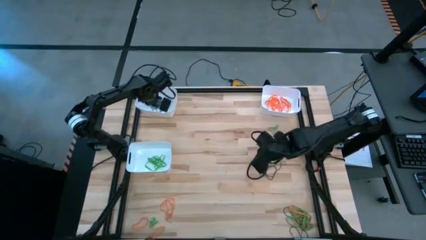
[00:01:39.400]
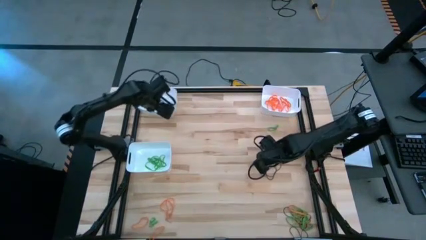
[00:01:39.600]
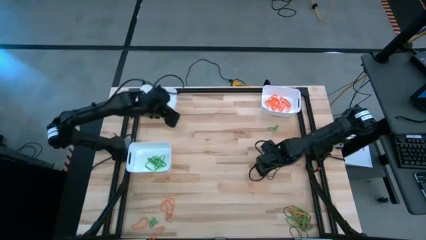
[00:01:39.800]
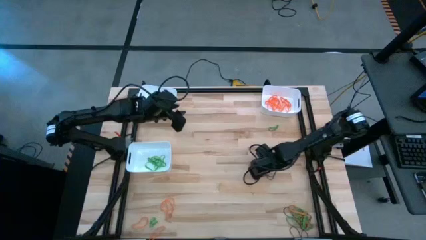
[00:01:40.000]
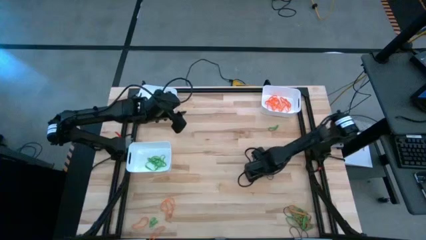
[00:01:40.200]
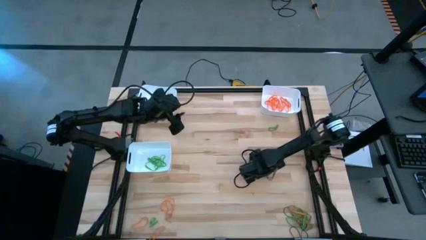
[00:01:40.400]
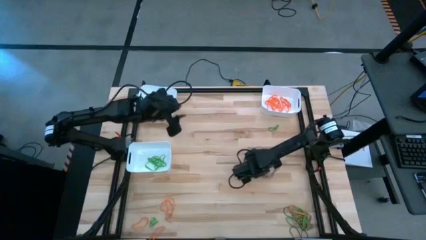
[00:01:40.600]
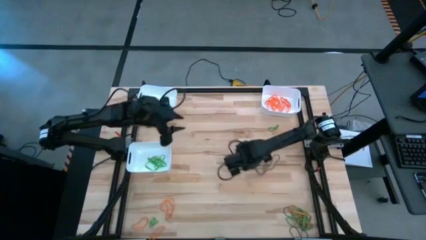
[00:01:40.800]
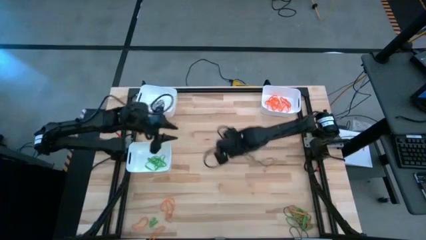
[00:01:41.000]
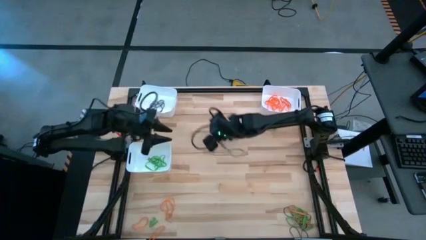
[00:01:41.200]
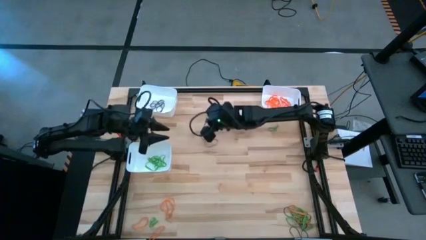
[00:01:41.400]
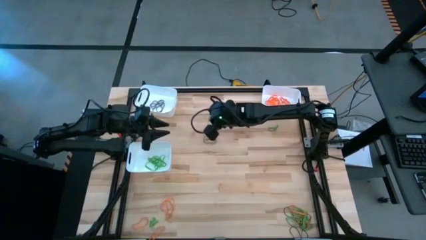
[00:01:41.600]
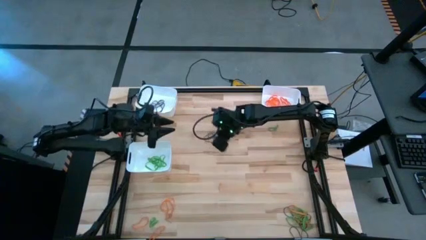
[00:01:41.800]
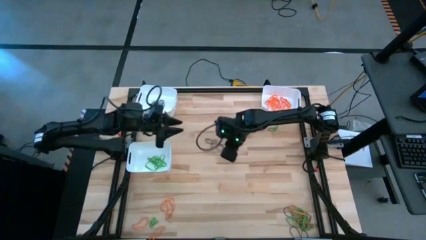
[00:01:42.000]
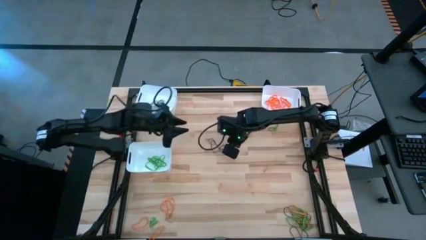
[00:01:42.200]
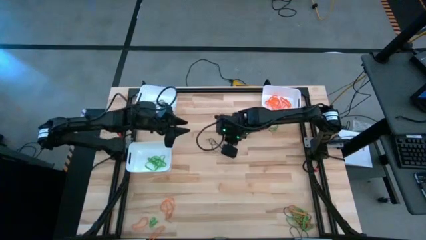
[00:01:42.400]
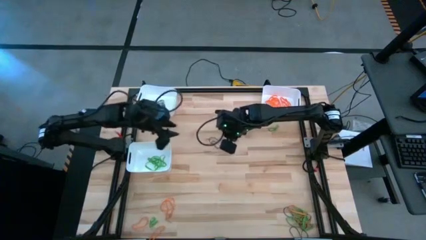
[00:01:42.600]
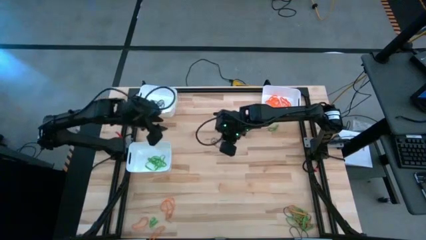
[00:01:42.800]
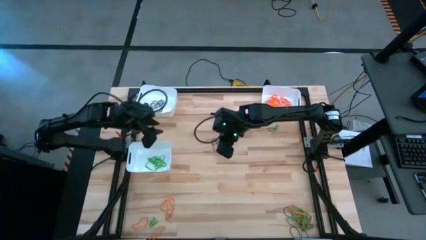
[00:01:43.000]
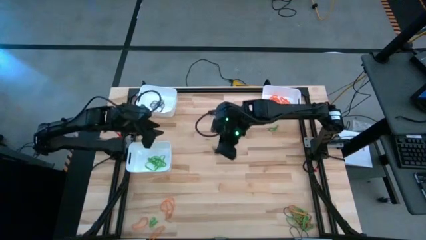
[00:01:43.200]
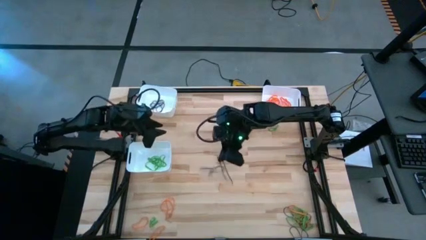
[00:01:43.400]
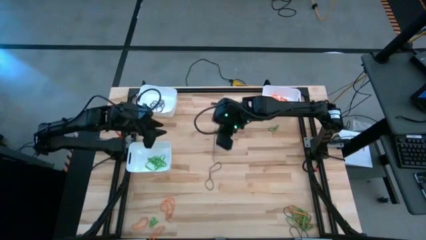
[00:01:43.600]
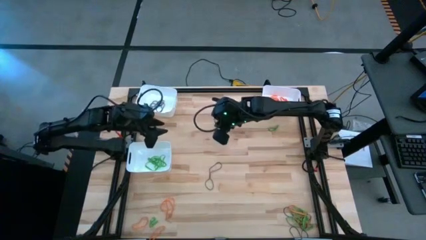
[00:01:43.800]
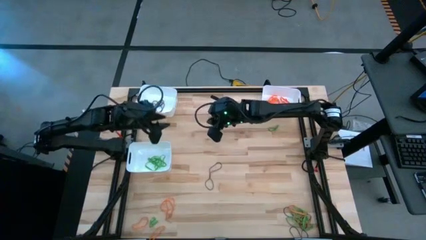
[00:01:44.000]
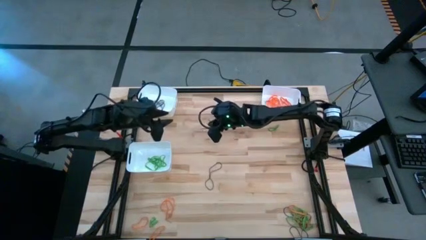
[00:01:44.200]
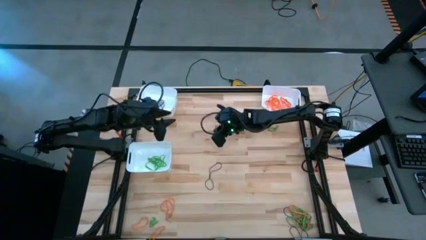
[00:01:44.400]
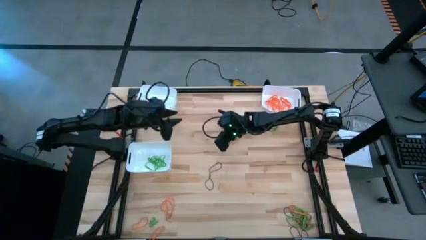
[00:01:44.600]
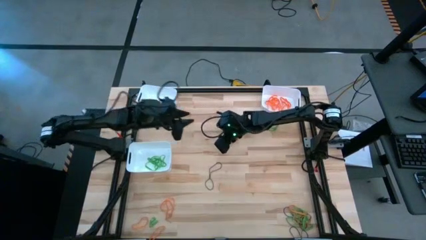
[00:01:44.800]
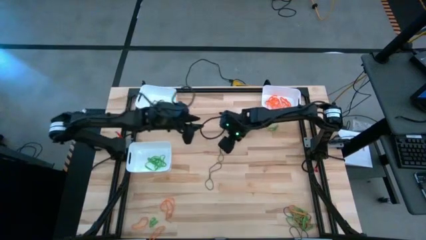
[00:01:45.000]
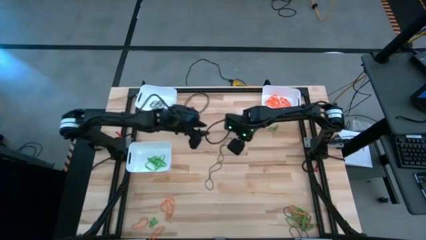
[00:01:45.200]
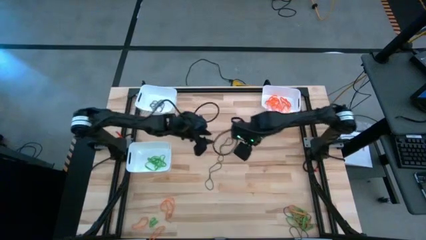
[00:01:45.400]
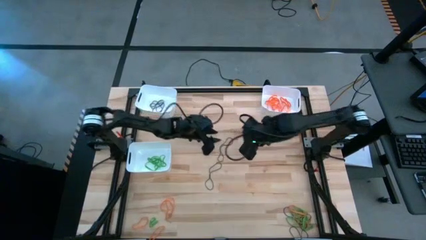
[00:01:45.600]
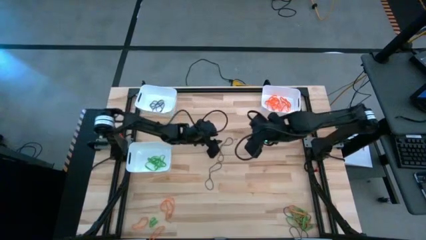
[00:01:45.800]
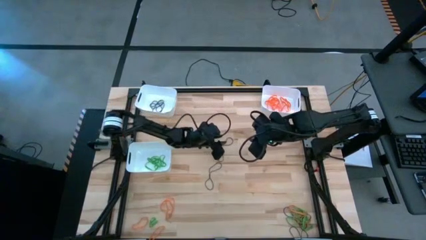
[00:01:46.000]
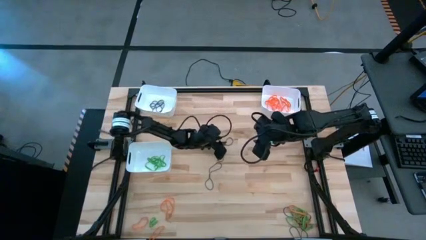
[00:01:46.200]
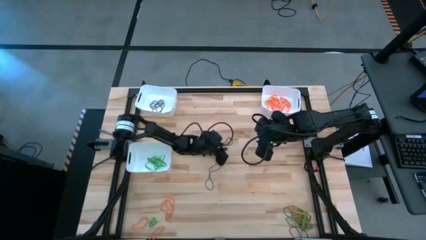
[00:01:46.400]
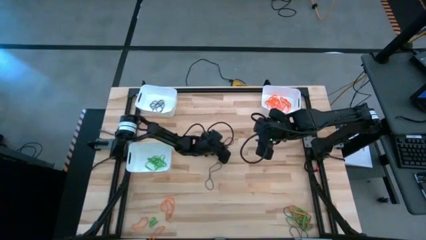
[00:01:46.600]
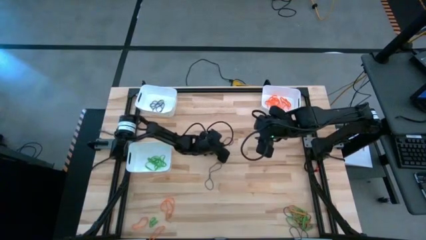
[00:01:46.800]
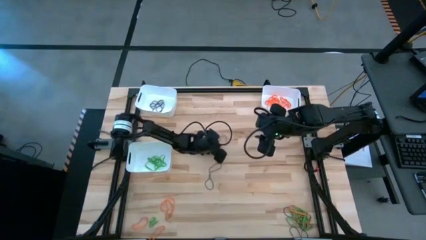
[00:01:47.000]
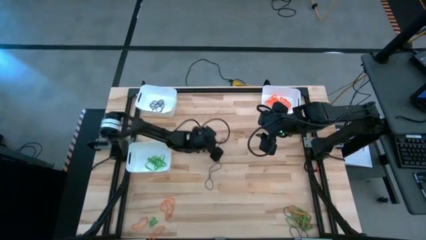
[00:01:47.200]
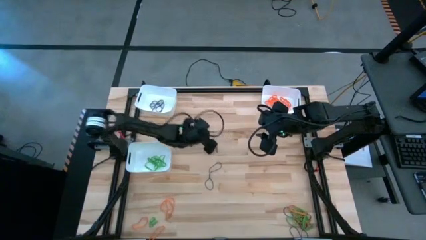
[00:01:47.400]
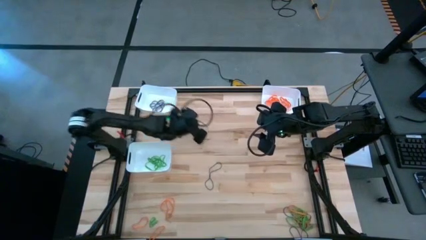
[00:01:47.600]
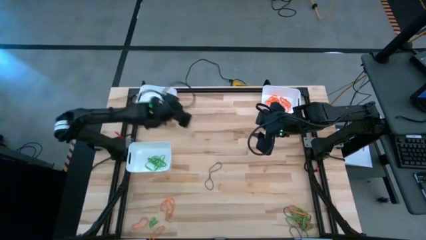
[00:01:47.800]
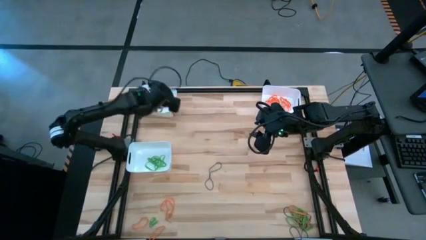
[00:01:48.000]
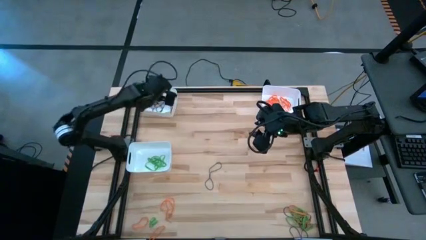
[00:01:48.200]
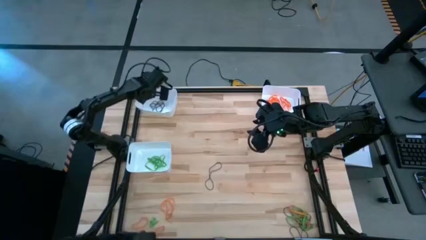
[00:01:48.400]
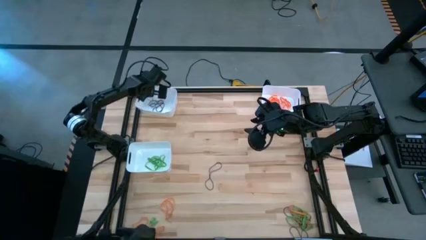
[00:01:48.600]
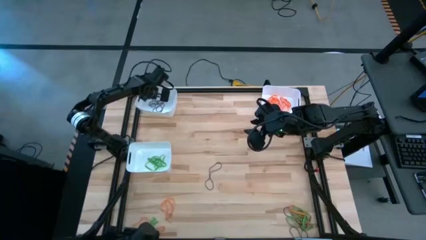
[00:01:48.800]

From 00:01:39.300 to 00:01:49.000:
Task: Sort rubber bands into baskets
Put the purple rubber band into the top left white bin

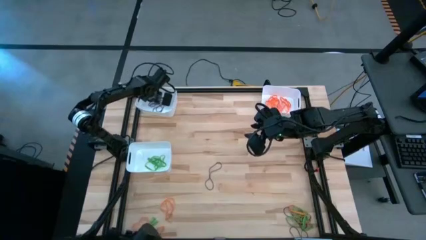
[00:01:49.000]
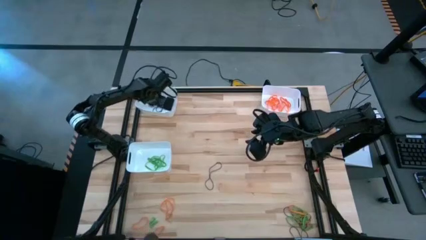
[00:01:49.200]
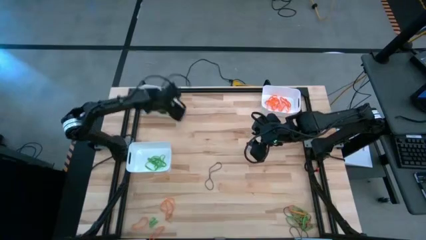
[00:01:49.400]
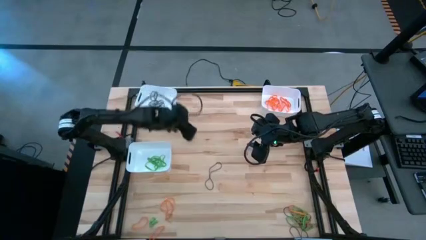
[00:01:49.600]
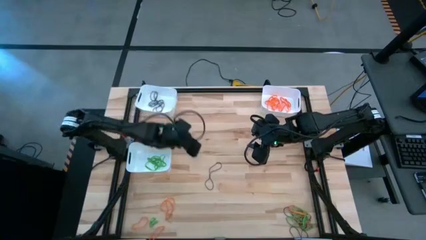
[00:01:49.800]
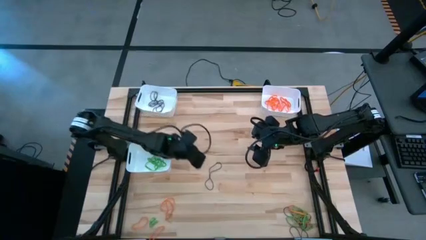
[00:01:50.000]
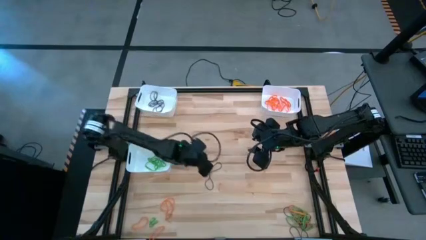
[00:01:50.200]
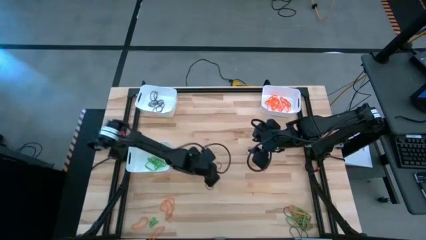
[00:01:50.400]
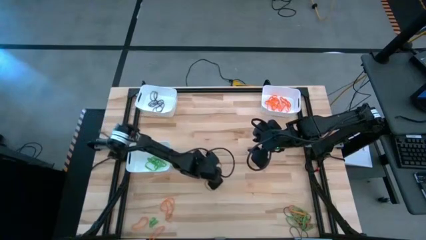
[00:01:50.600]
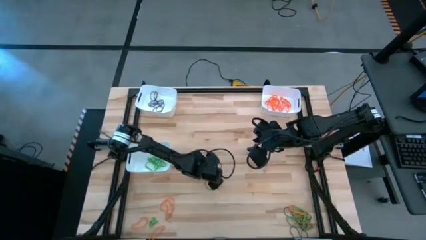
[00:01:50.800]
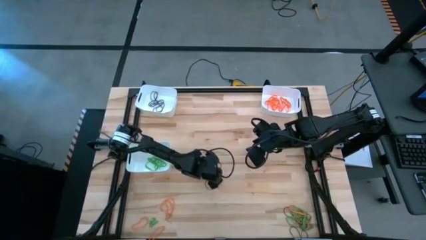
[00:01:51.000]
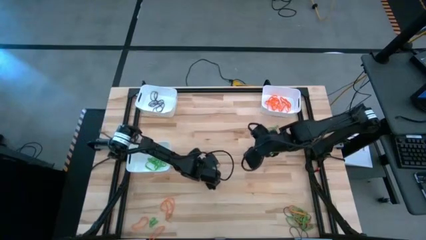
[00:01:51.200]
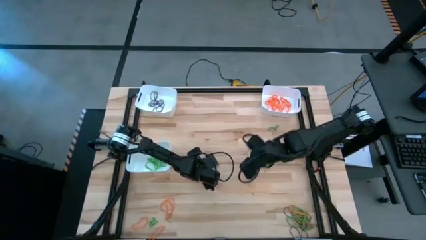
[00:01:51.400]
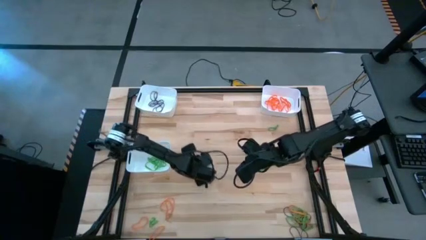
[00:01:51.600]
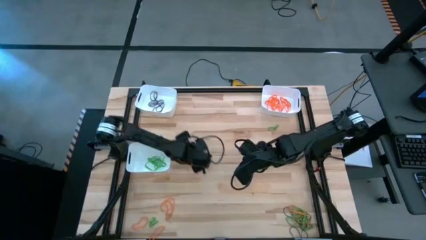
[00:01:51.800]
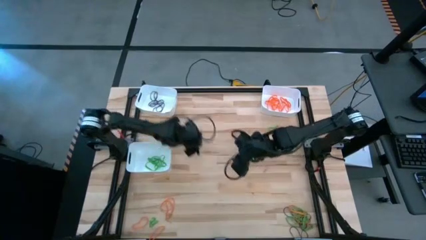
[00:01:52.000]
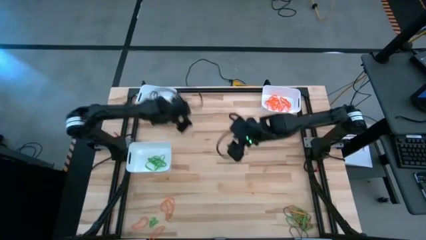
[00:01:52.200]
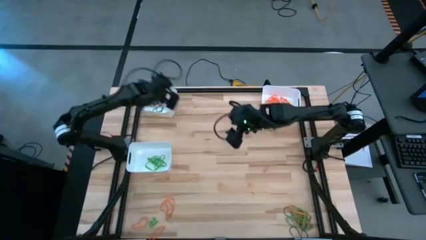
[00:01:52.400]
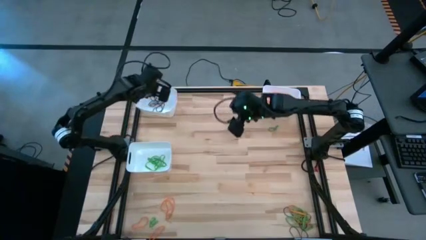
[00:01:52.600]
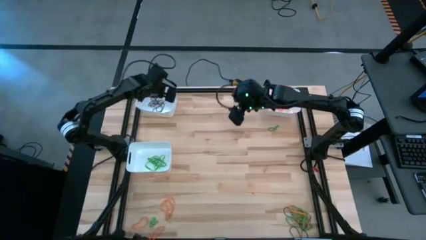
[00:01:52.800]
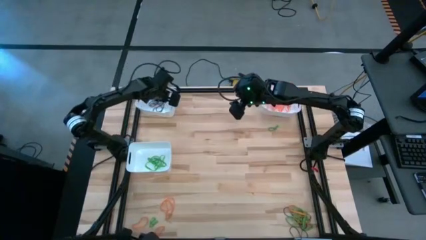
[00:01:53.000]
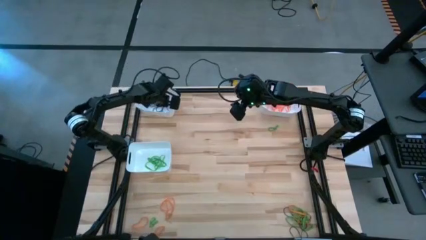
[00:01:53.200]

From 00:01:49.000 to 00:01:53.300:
Put the purple rubber band into the top left white bin
